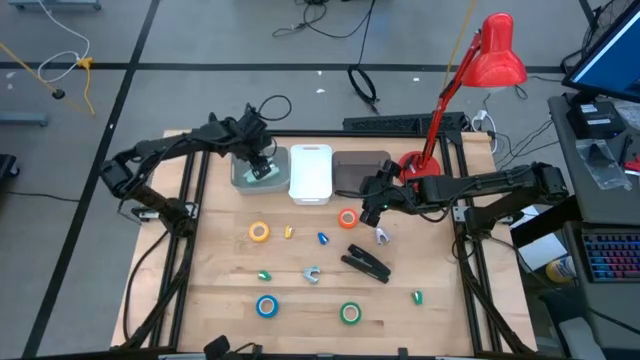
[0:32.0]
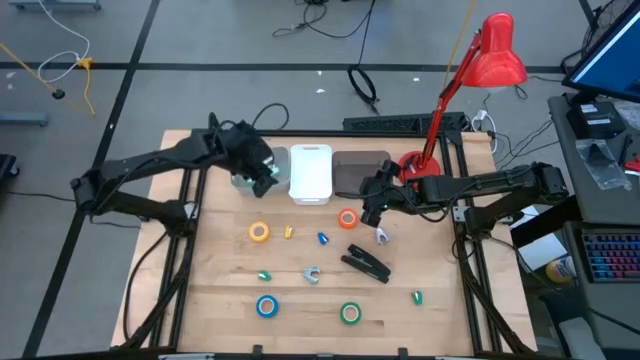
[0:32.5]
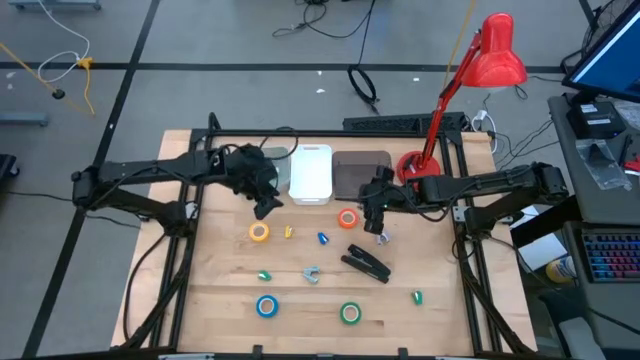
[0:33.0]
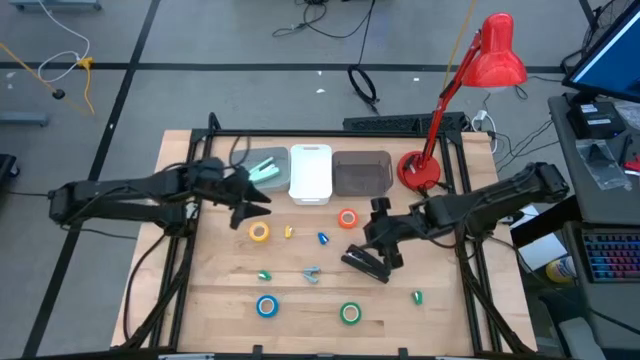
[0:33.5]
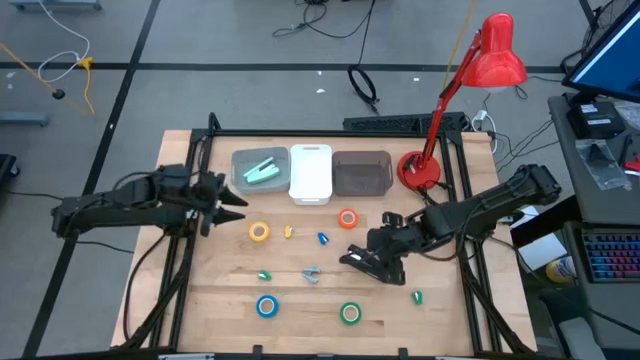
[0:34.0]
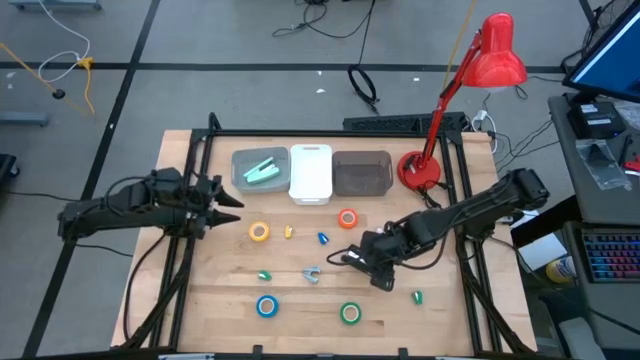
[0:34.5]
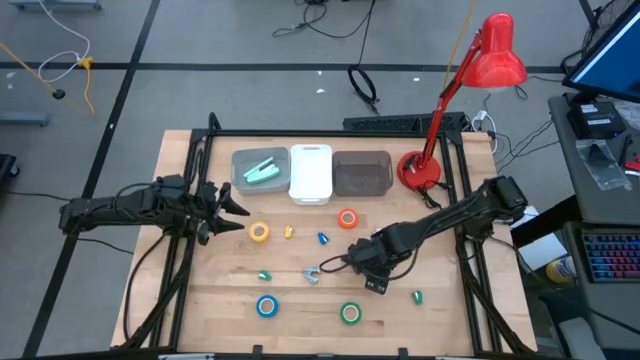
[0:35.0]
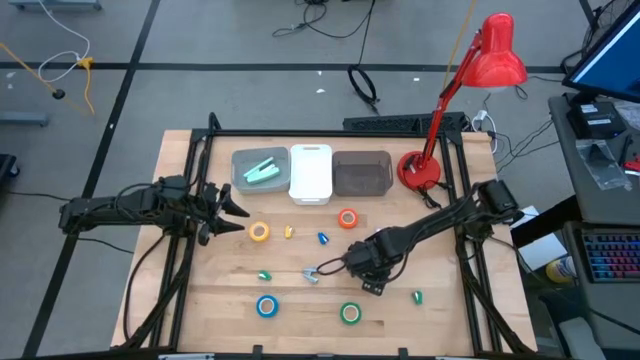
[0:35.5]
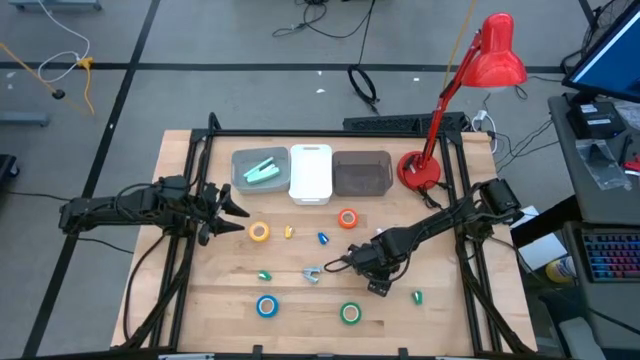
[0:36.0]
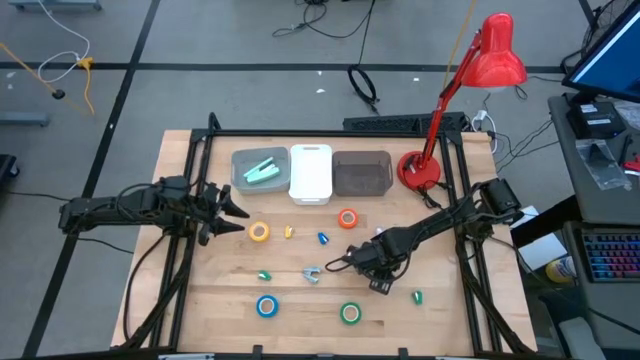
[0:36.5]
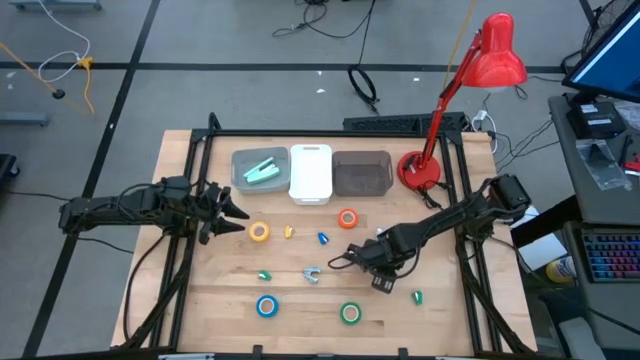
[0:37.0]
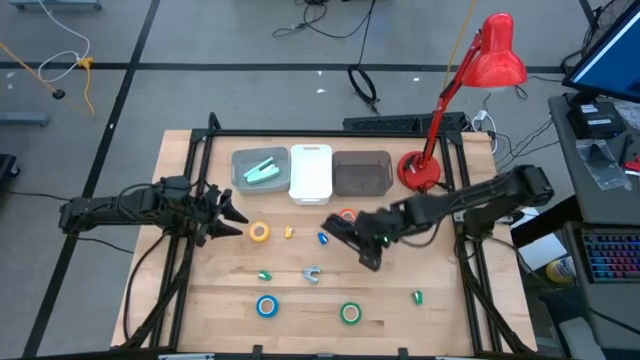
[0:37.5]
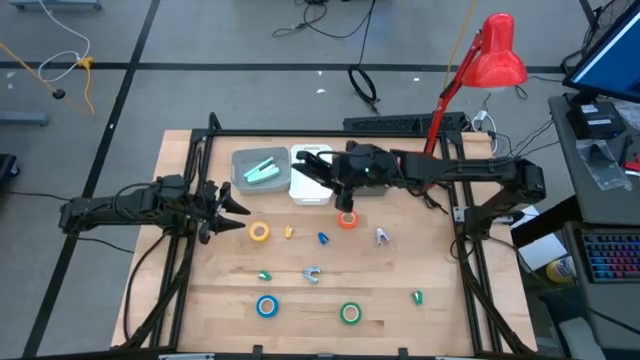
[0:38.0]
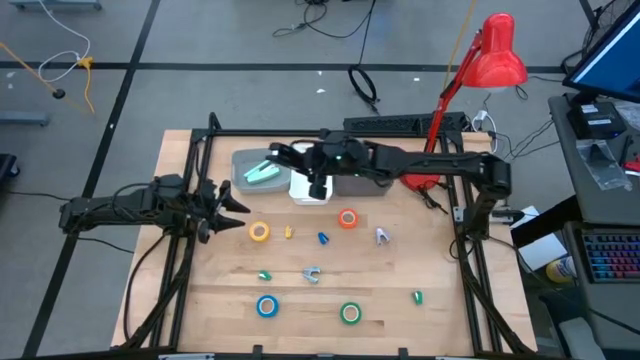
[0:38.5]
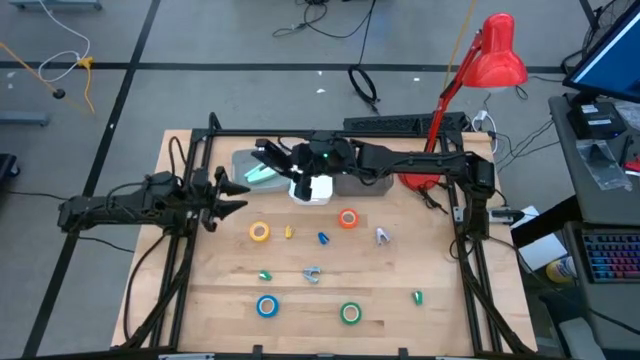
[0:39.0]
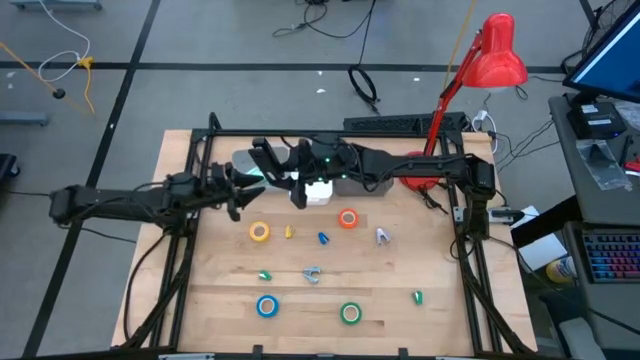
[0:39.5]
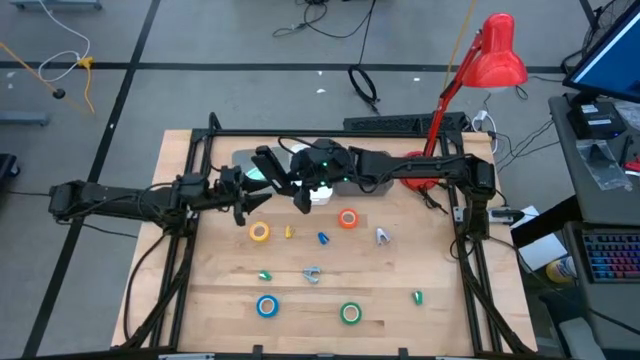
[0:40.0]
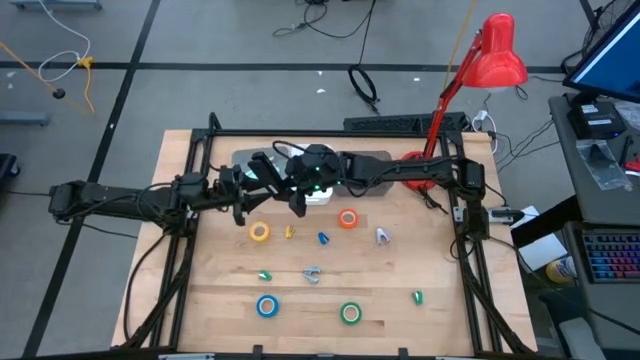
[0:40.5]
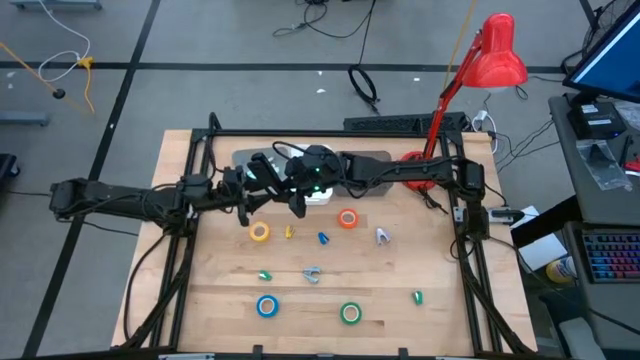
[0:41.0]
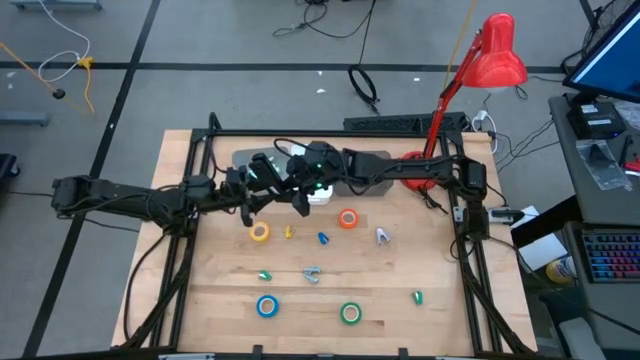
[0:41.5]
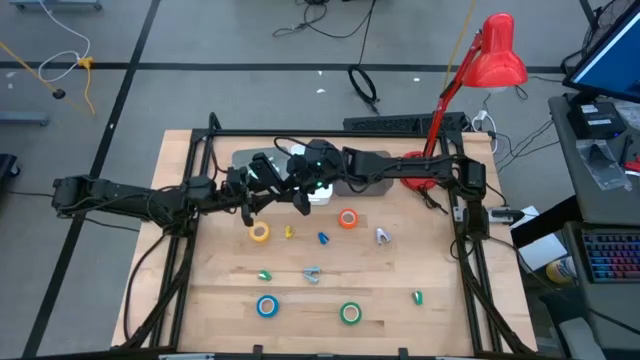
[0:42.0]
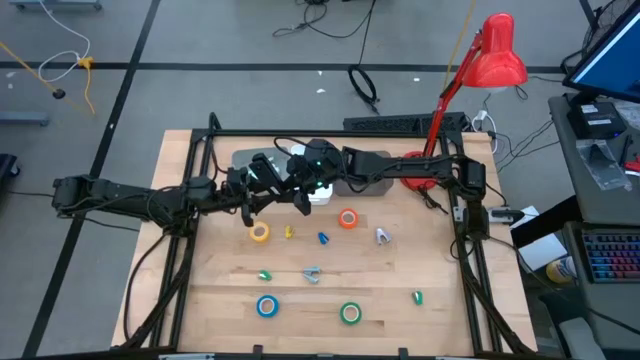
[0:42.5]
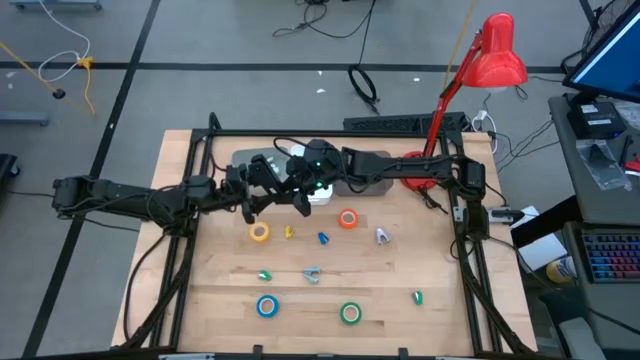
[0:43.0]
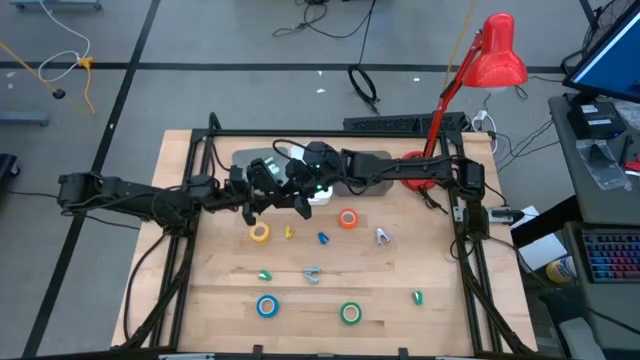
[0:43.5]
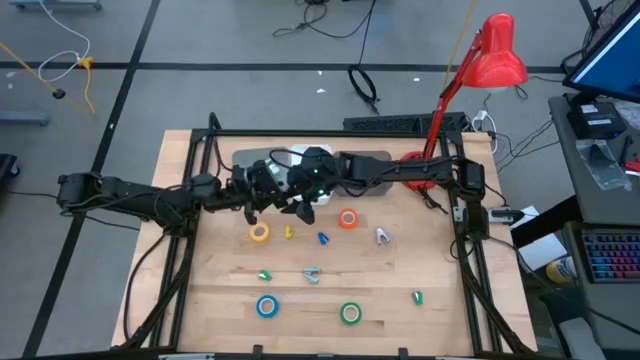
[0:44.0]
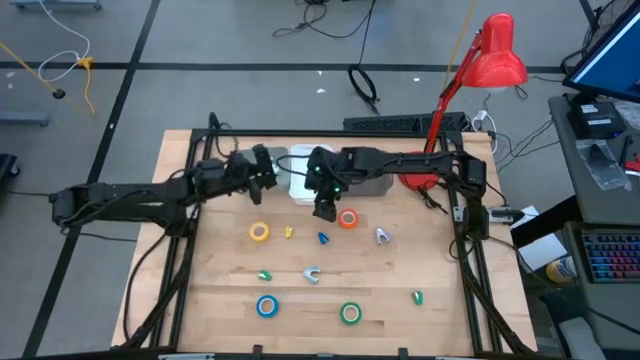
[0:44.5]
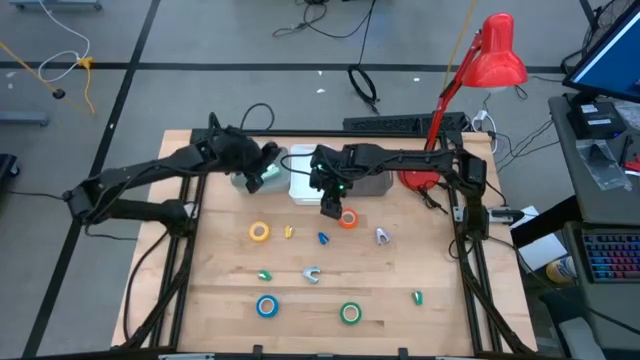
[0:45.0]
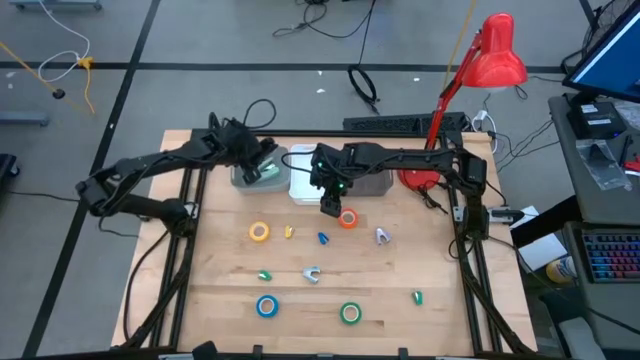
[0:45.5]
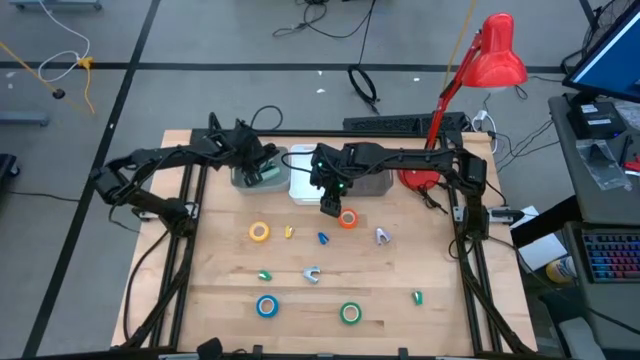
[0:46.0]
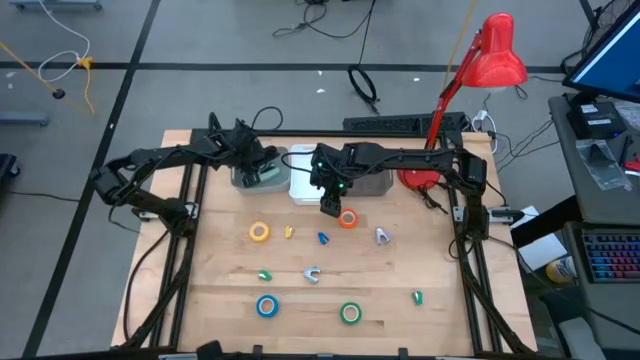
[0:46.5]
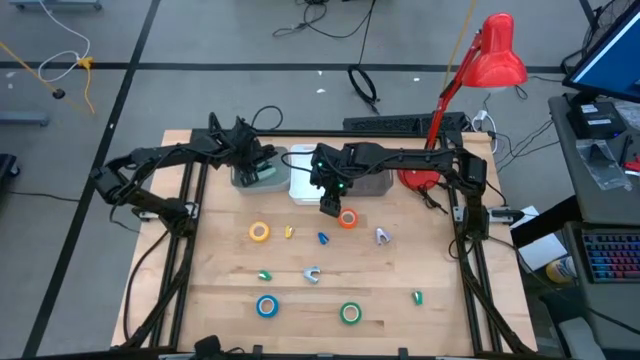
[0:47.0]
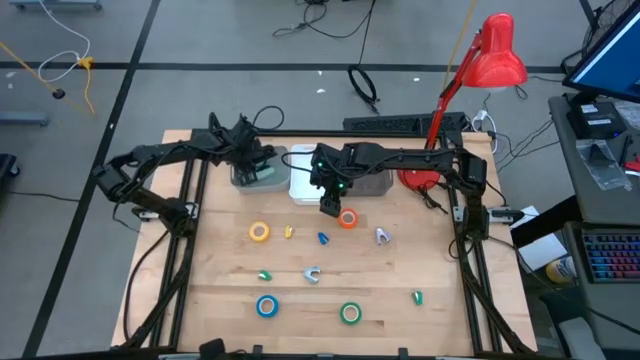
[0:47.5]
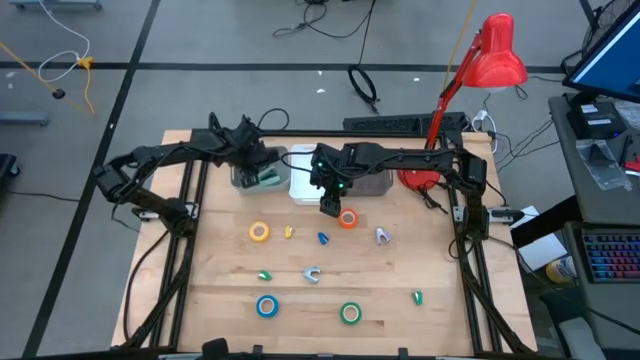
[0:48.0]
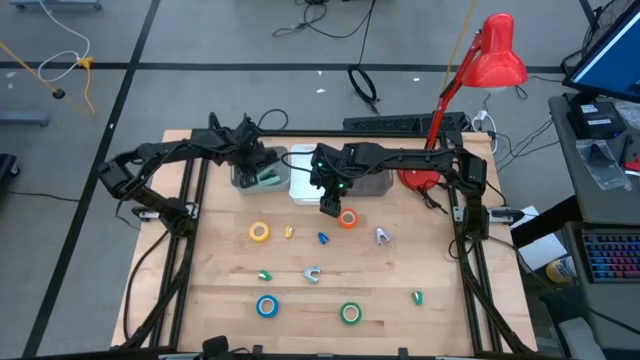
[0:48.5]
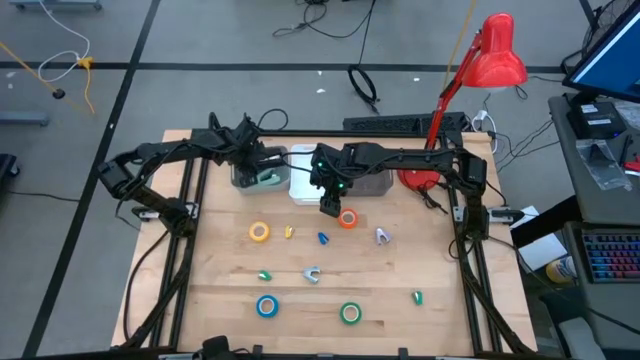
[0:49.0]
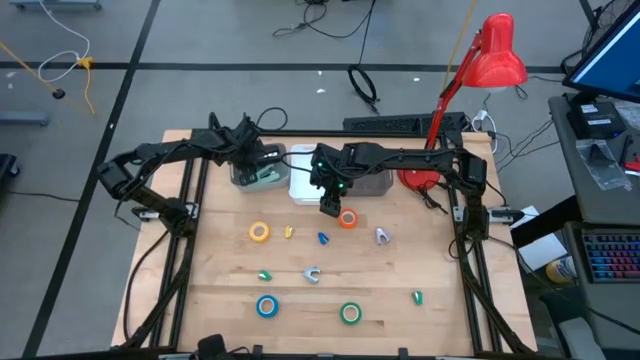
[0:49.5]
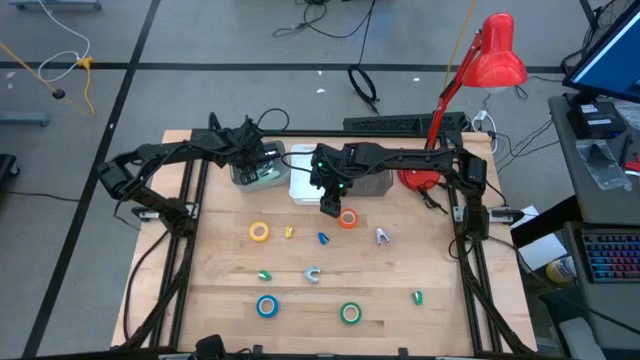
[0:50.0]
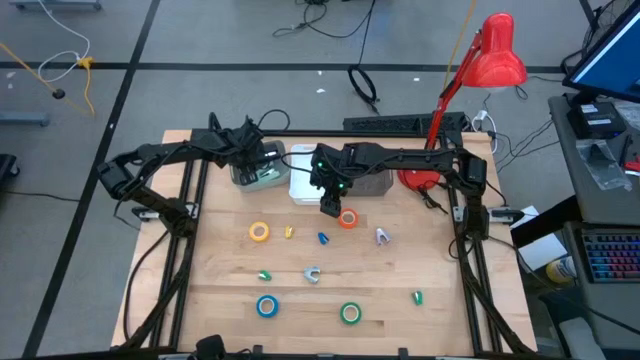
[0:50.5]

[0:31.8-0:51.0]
Task: Pick and place Stapler, Stapler remover, tape
Put the black stapler into the gray bin

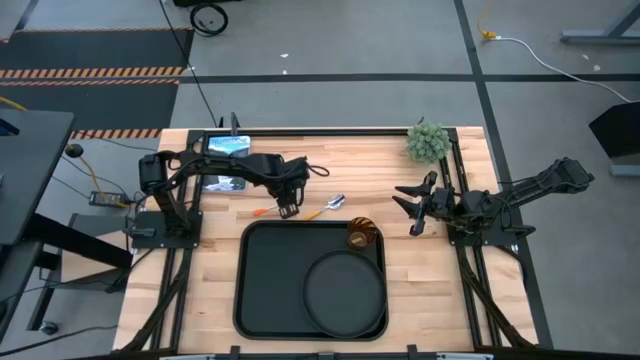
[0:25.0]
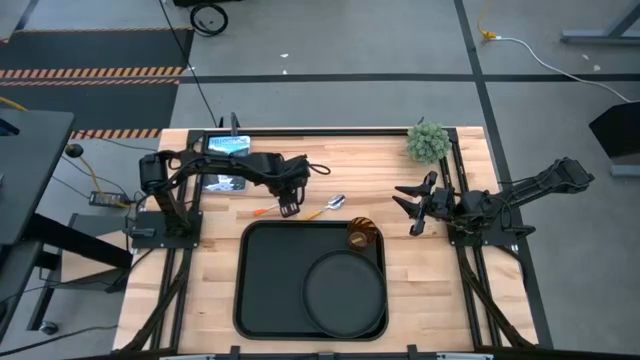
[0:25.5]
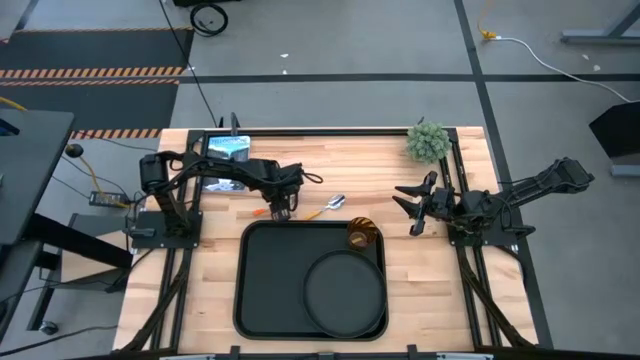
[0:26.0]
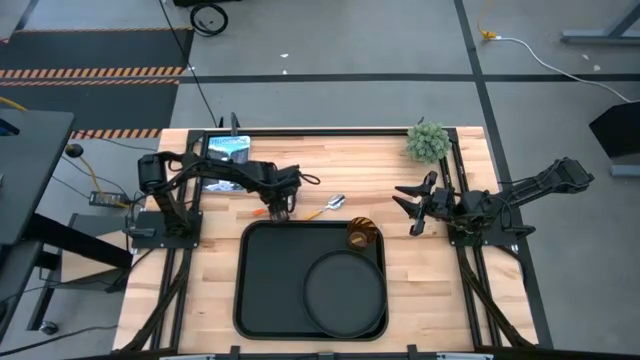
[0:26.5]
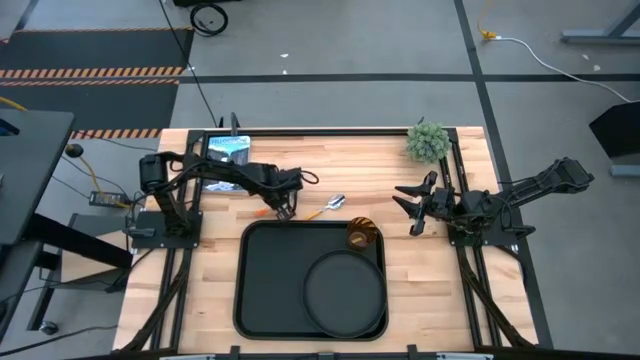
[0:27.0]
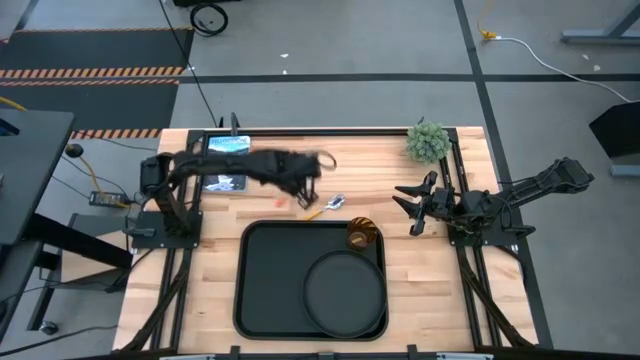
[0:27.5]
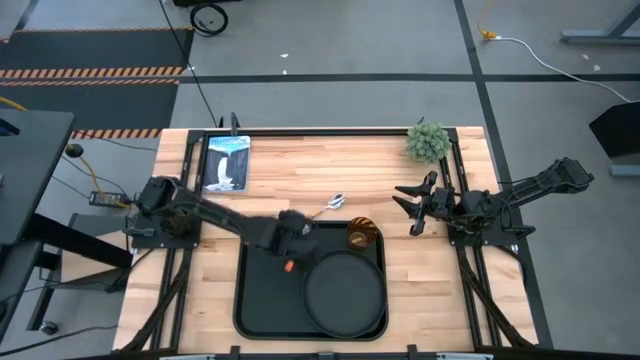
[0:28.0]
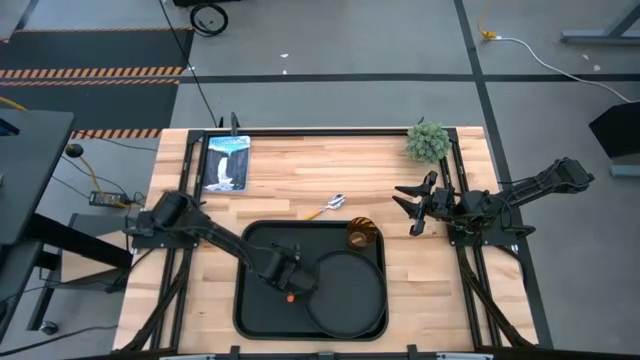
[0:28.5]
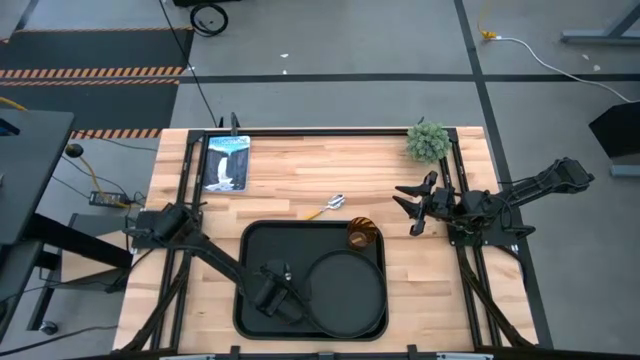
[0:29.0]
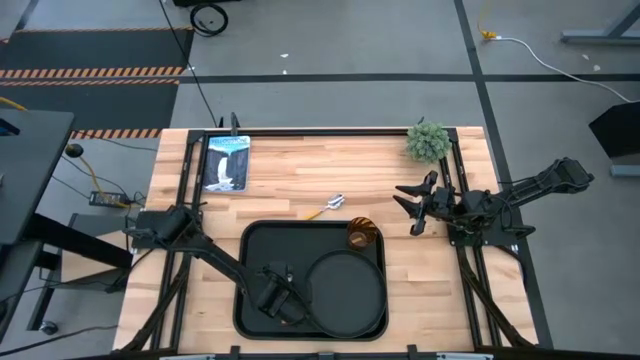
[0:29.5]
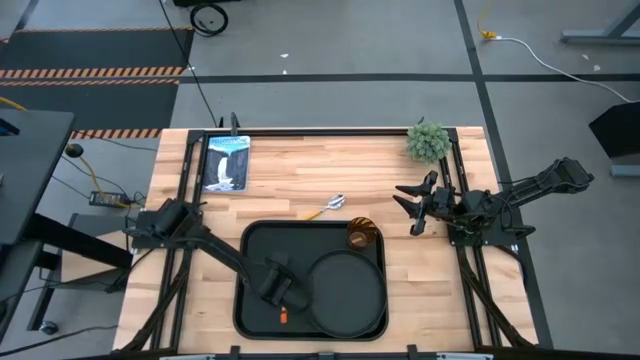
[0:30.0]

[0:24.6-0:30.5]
Task: Pick and place plate/cup/fork/spoon on tray
Put the orange fork on the black tray, on the left side of the black plate
